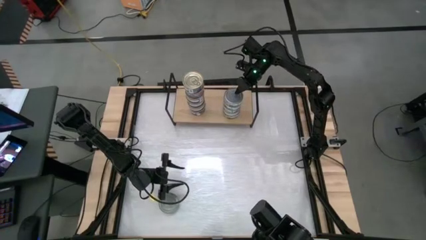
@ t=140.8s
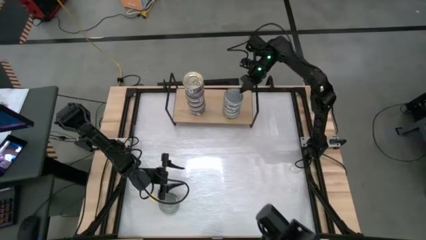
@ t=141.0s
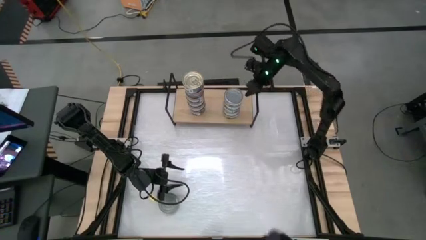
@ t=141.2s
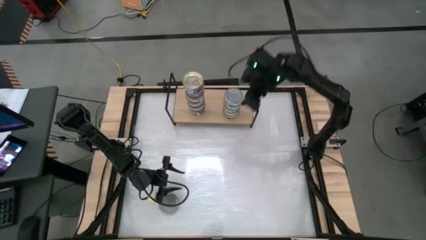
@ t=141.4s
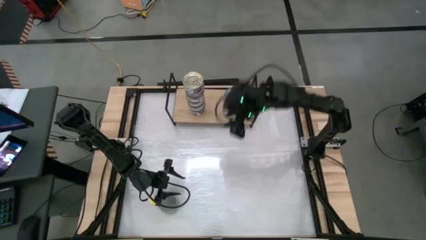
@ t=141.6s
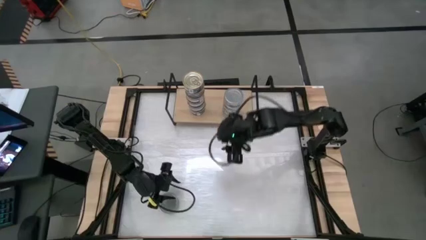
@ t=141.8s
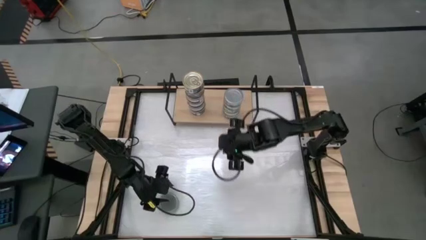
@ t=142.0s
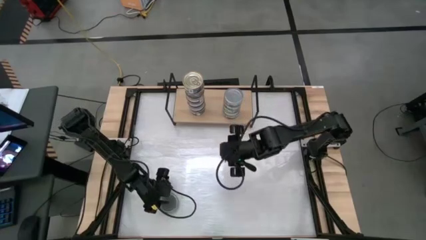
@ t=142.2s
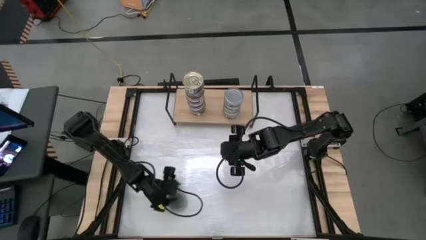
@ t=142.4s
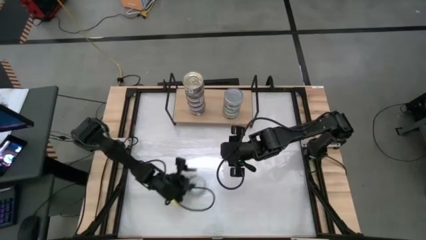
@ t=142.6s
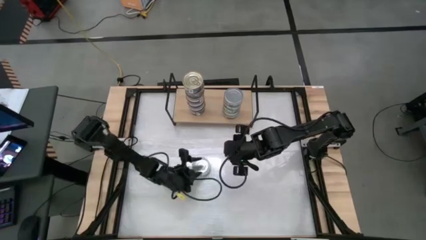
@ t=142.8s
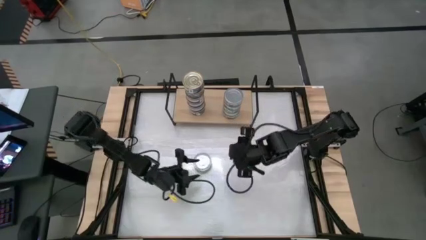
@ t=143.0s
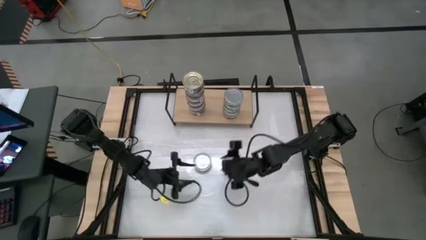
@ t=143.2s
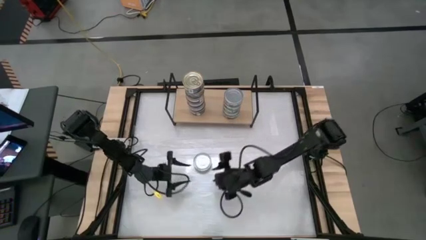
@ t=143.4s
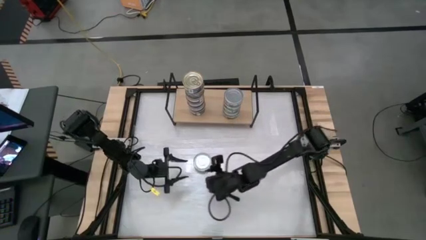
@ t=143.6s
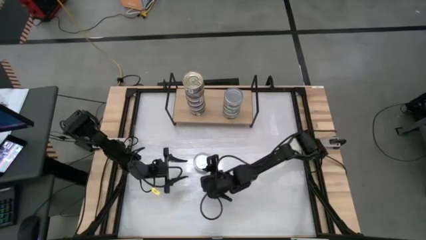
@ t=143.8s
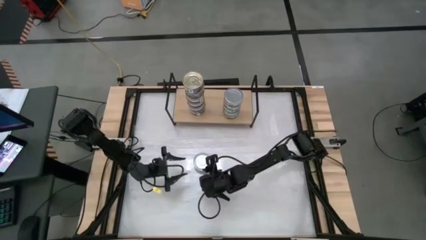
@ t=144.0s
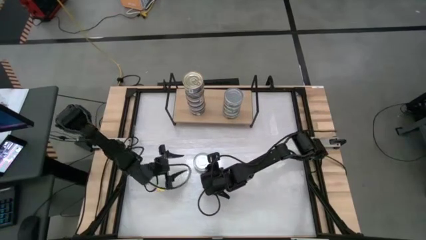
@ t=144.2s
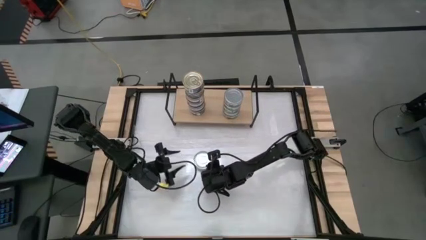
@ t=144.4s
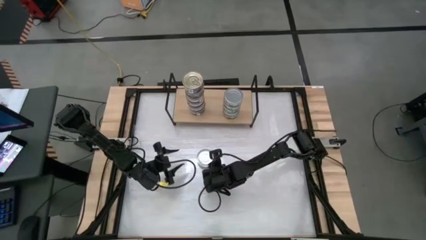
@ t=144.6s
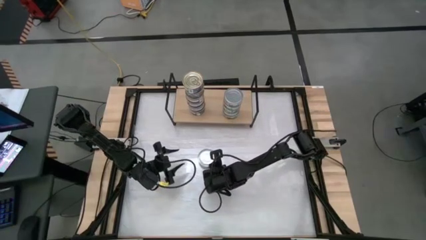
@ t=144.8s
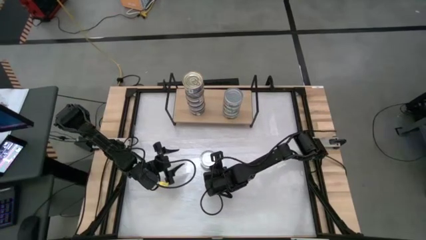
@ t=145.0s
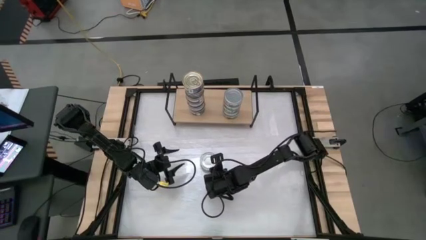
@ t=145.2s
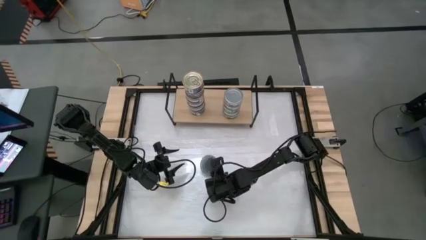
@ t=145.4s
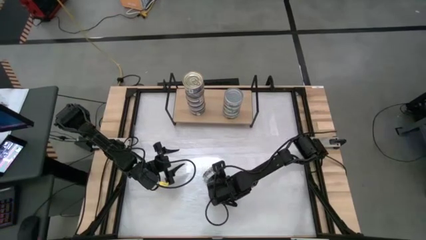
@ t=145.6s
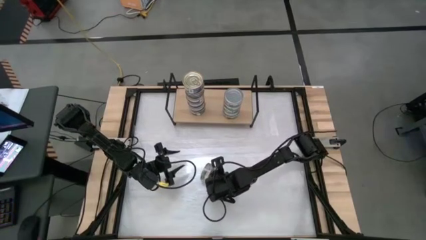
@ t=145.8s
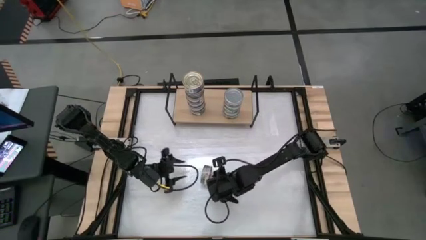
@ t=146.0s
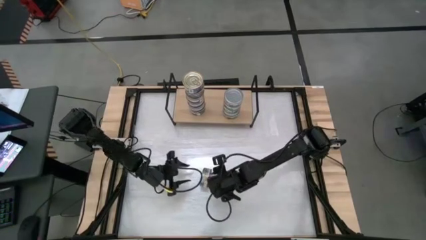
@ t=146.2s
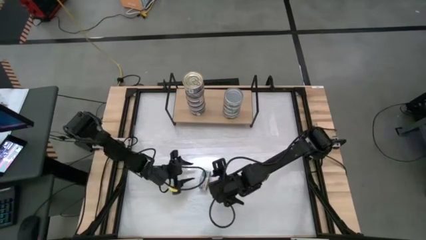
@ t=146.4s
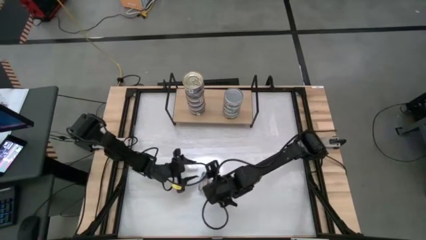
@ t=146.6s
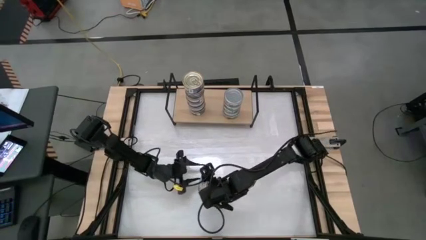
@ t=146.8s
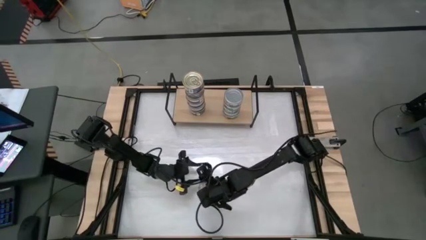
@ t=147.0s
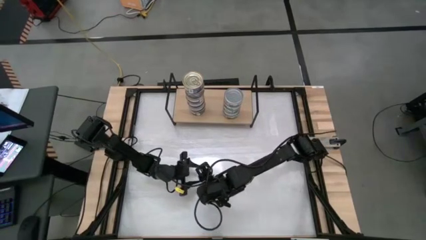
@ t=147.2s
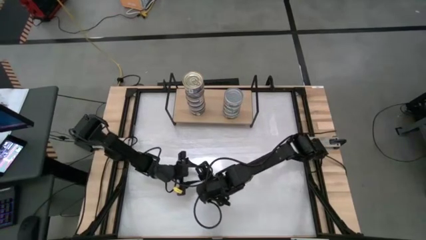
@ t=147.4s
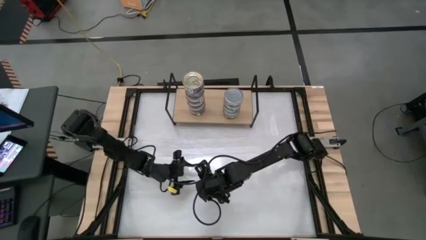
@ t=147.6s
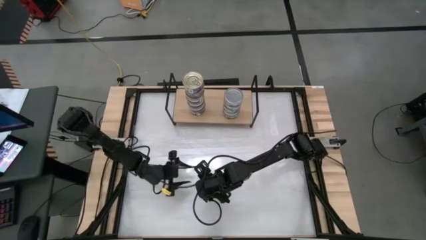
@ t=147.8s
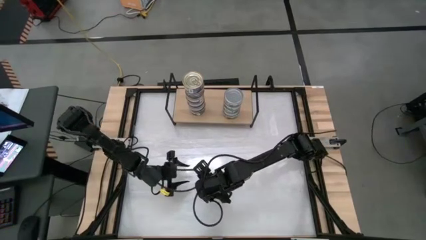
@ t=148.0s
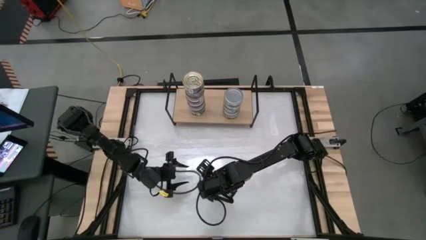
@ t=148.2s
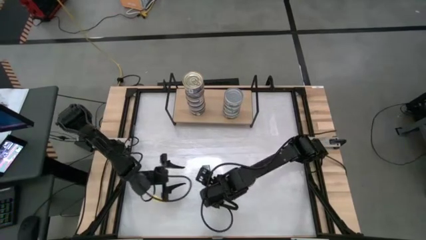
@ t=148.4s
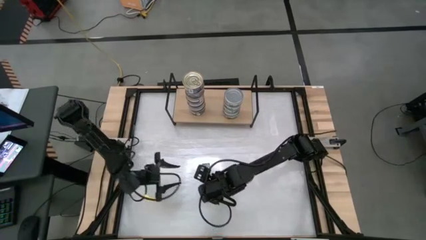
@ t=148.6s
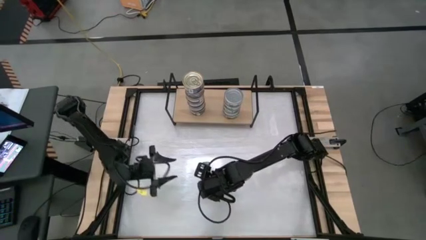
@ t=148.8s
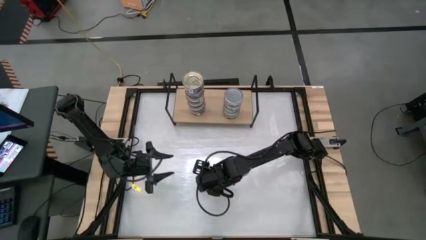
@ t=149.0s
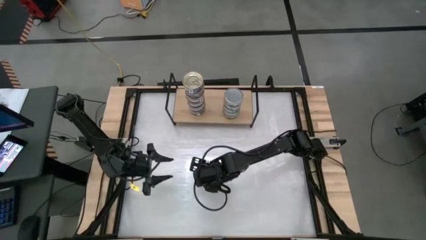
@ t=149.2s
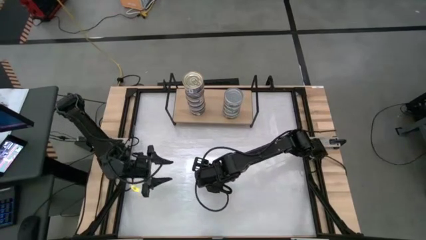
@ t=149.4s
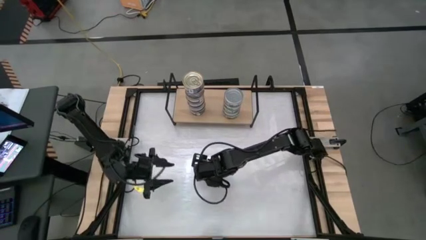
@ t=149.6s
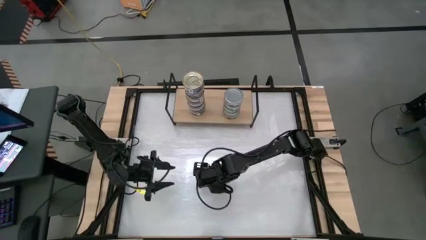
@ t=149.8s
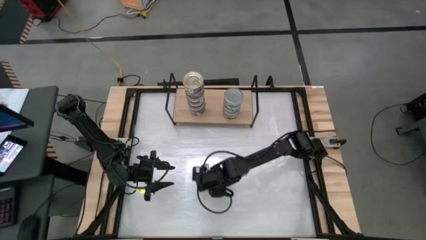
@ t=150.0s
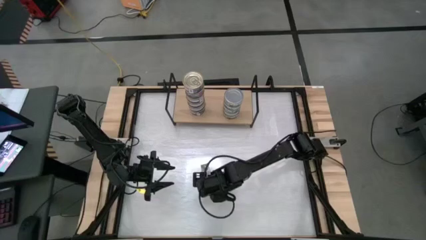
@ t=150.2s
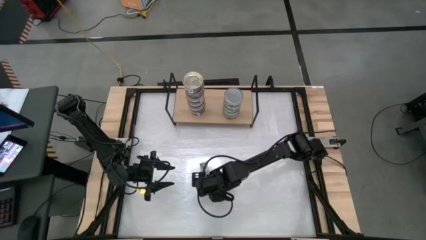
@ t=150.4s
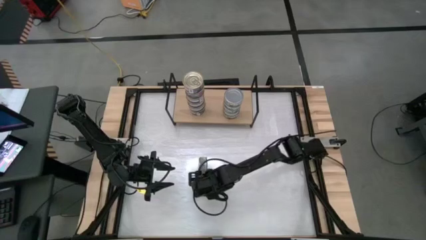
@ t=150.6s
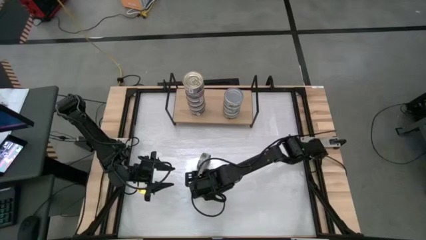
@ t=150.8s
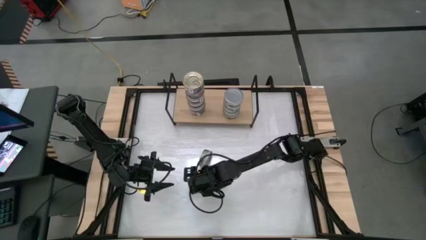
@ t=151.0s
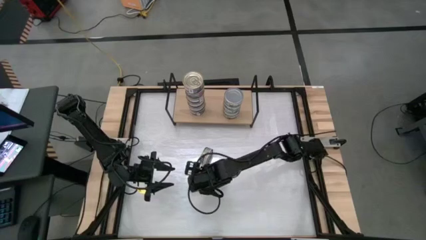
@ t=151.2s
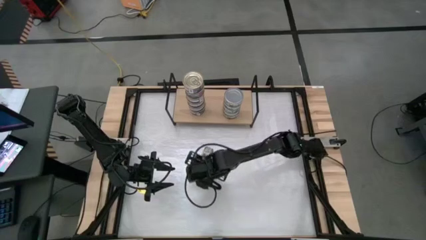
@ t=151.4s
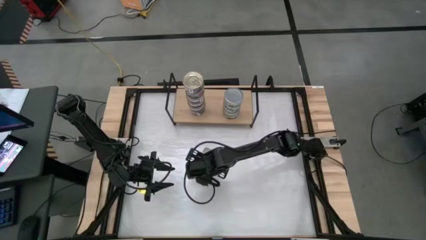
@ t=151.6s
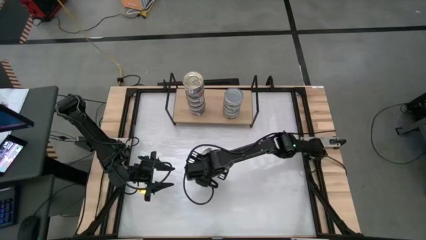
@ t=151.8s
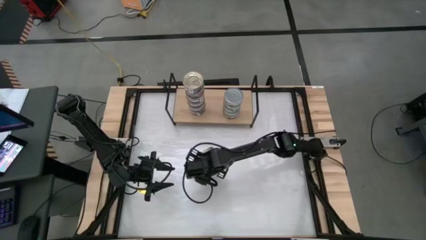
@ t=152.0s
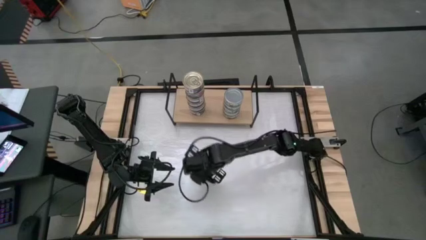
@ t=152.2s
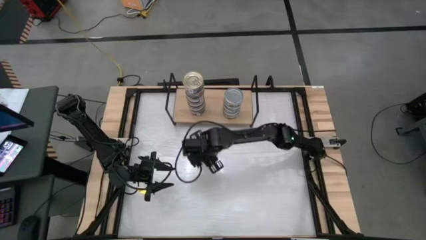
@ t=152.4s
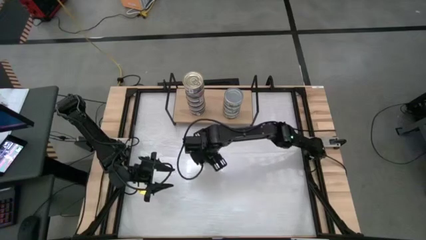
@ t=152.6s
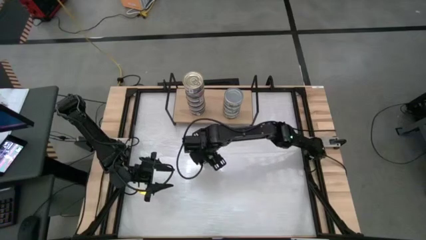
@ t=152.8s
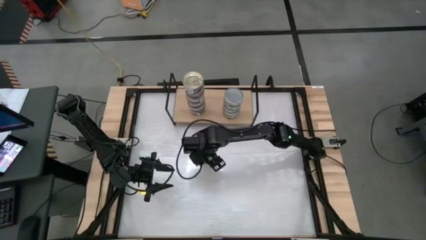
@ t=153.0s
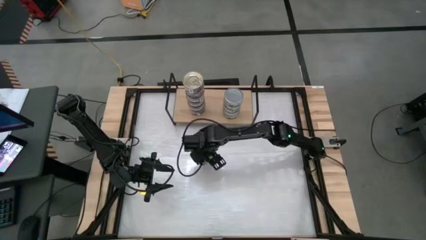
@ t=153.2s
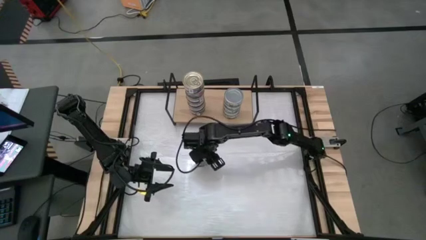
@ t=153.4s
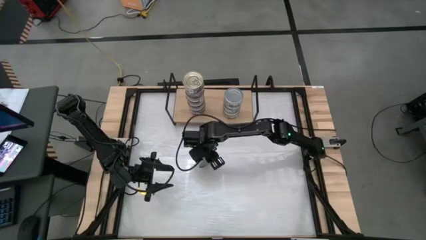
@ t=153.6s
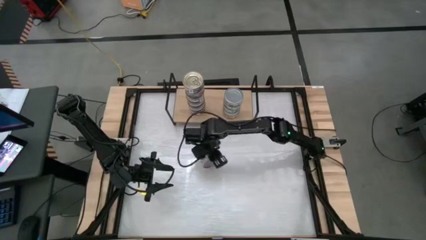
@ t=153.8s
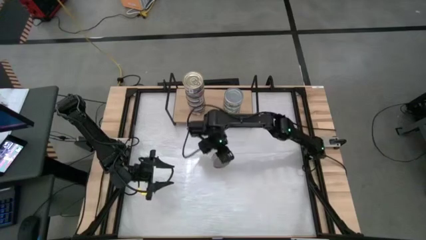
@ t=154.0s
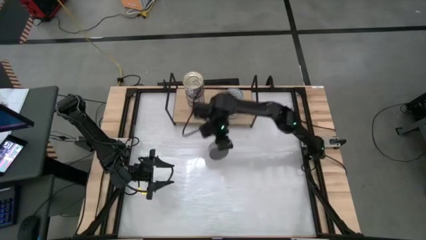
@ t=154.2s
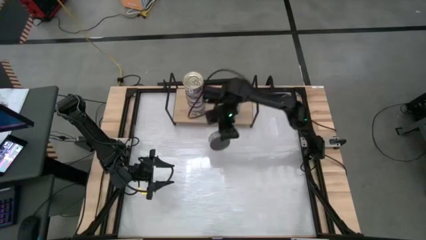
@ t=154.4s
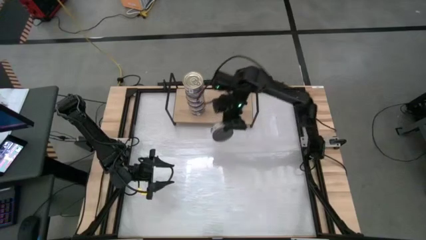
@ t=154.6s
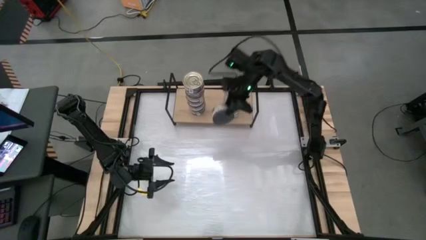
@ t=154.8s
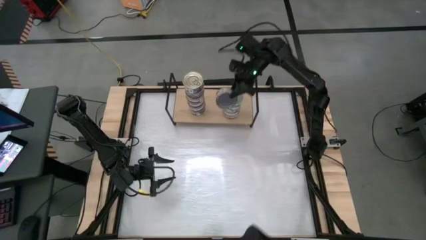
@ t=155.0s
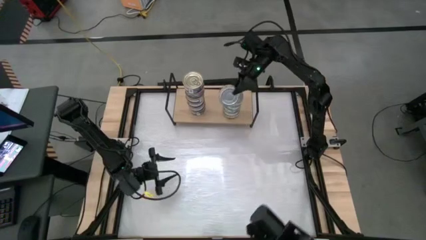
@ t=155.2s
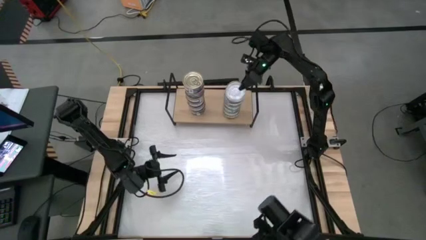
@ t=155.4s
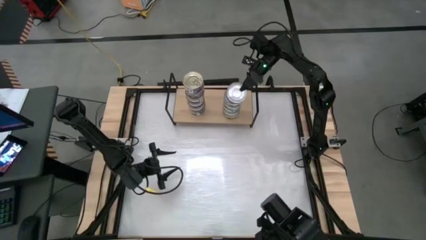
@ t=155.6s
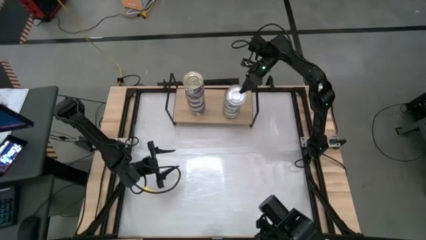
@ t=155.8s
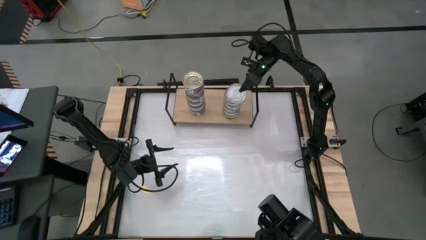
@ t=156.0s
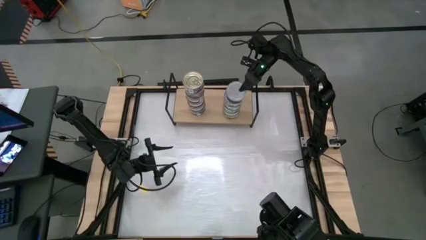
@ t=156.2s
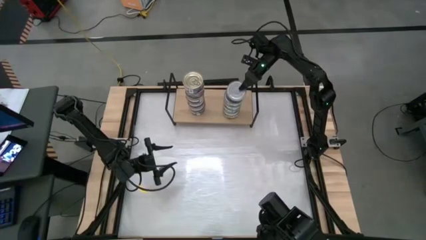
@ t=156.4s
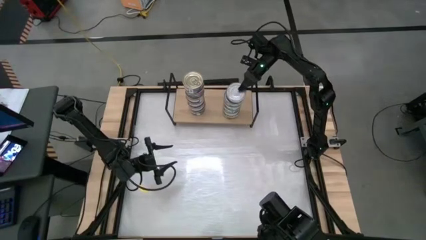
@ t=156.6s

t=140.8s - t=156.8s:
Task: Stack canned seafood by type on shelf
Stack the green tuna can on top of the other green tuna can on the shelf
